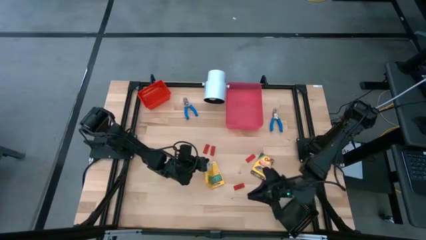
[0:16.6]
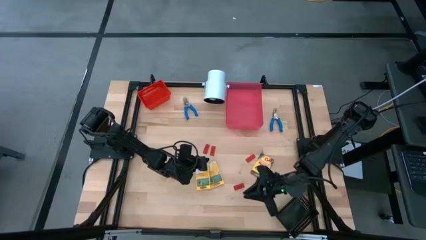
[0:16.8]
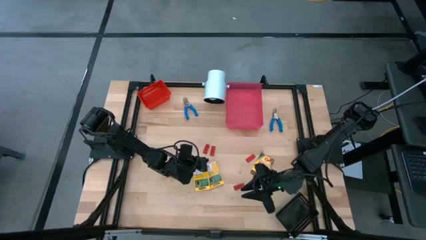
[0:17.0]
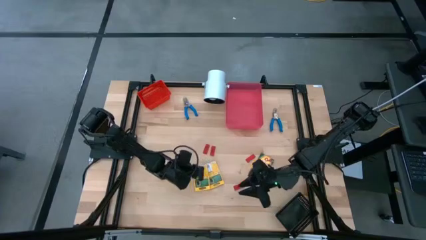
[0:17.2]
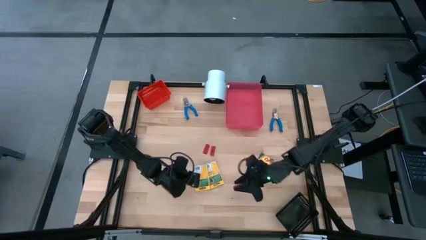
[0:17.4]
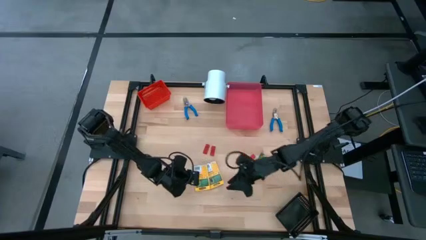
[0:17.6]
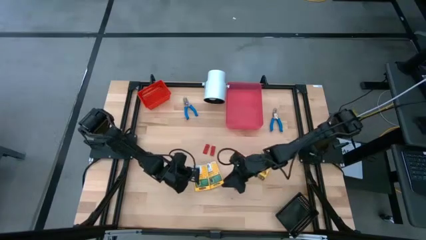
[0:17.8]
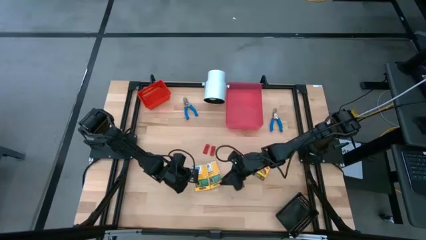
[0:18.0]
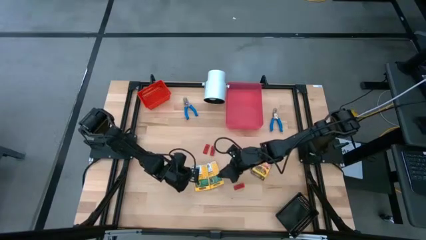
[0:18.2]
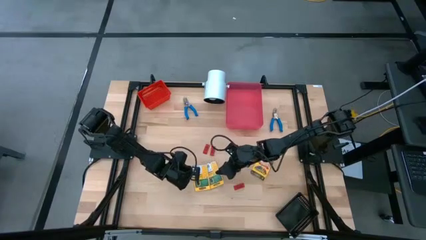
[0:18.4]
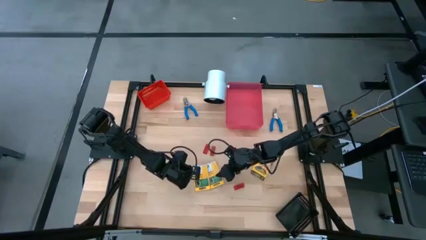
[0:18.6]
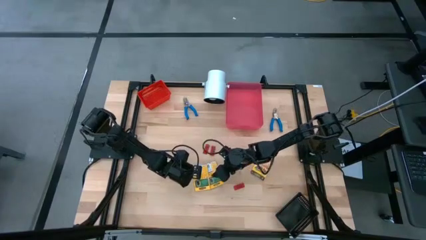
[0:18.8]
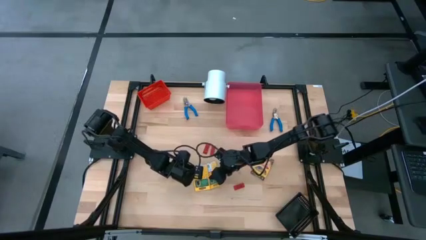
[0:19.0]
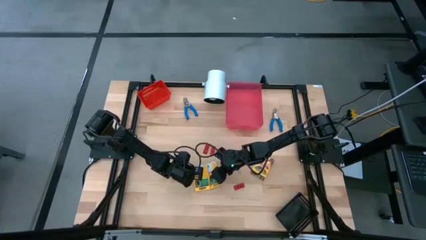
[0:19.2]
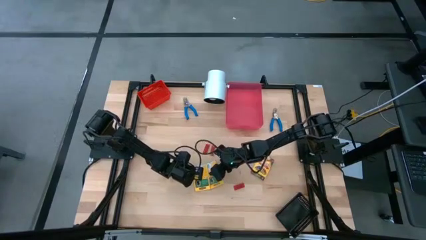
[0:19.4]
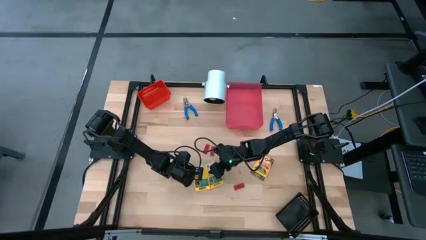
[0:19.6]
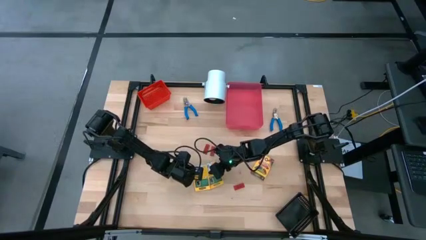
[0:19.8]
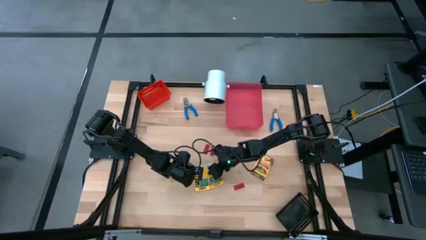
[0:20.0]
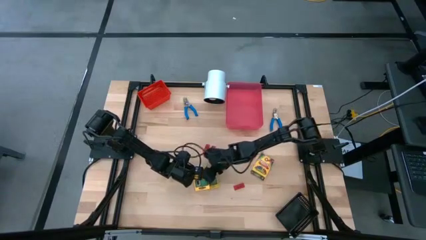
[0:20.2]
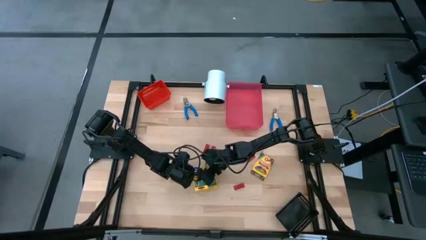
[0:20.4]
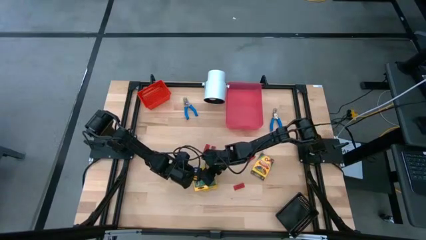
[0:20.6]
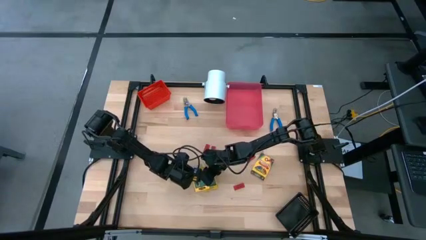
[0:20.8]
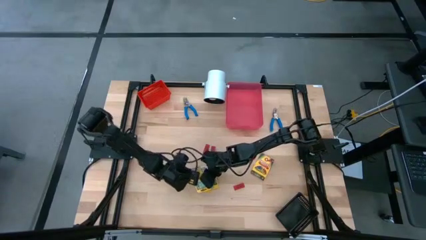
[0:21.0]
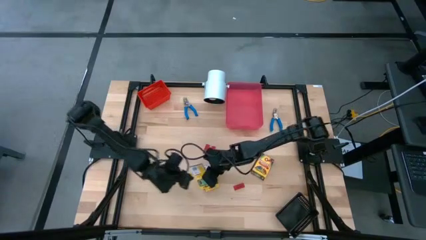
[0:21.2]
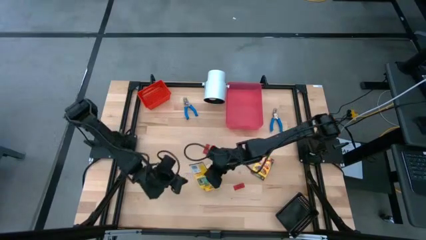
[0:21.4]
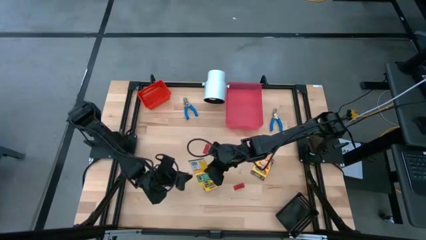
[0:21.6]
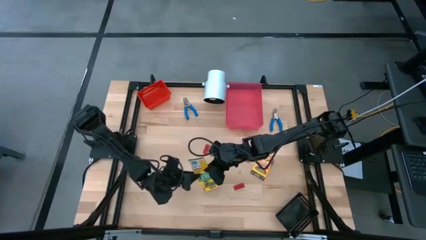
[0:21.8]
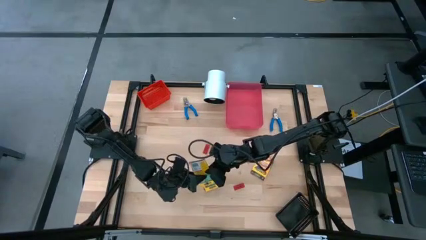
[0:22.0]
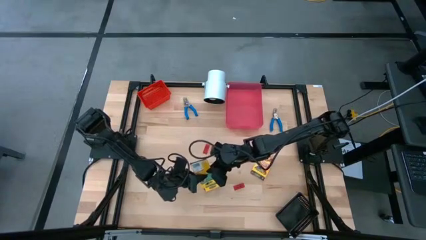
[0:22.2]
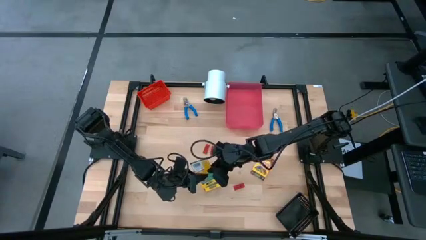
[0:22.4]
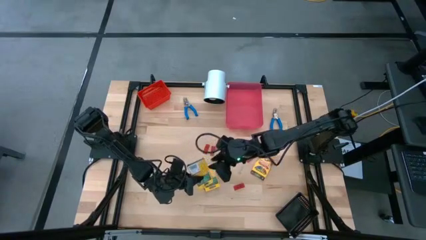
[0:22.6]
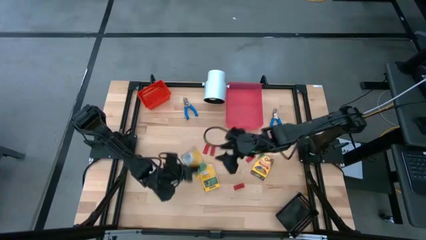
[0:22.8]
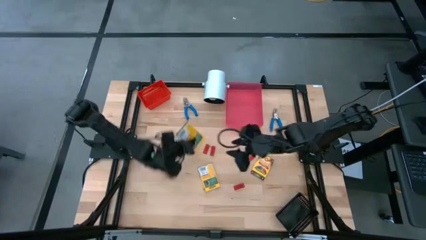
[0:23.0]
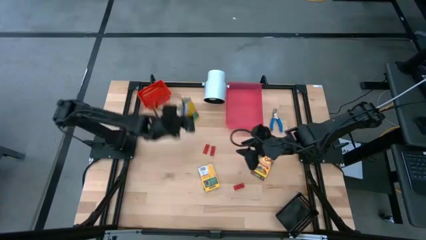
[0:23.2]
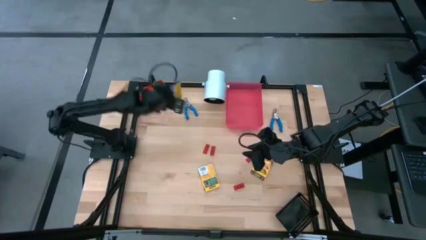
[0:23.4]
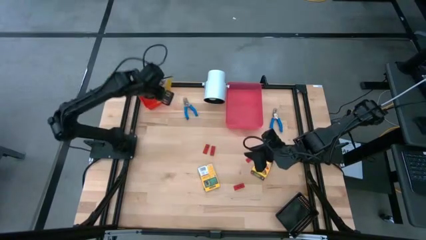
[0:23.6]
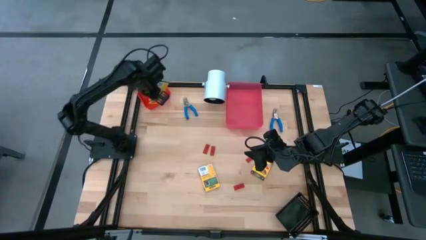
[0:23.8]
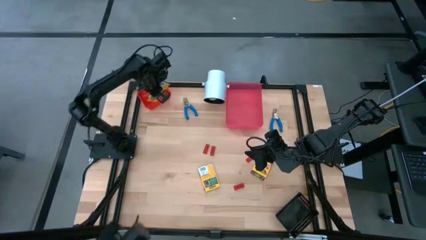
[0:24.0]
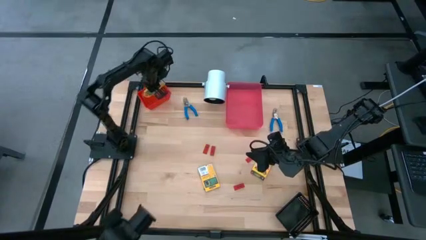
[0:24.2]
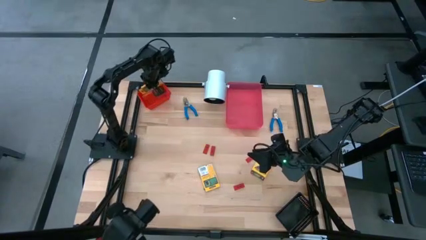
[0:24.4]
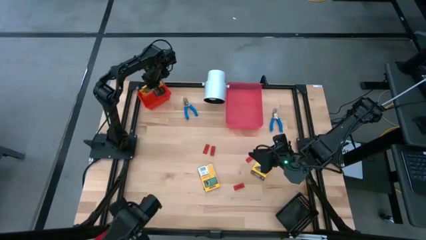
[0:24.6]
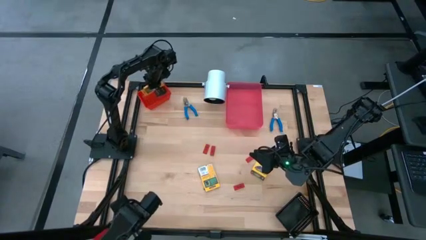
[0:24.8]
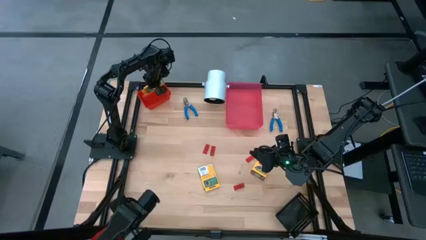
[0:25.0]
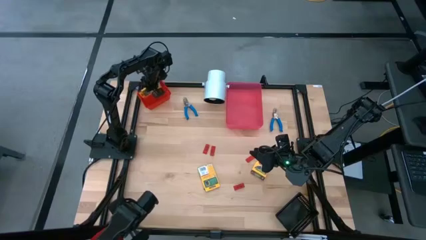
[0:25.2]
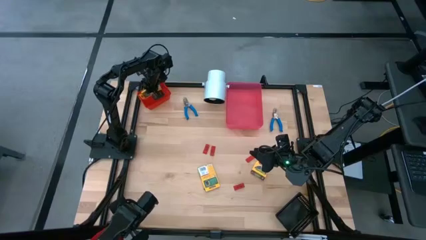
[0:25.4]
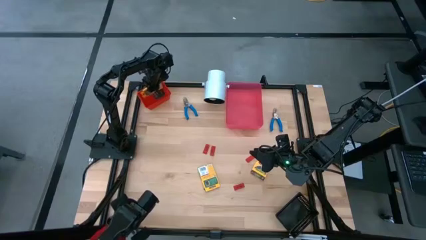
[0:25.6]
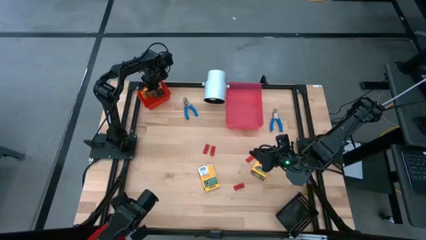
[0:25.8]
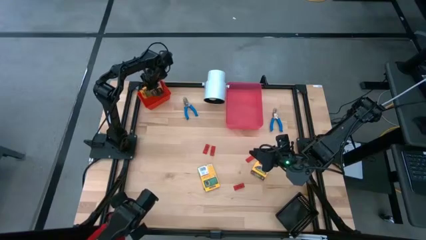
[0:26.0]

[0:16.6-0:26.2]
Task: Pick & Place School Supplies
Put the yellow crayon box into the red bin

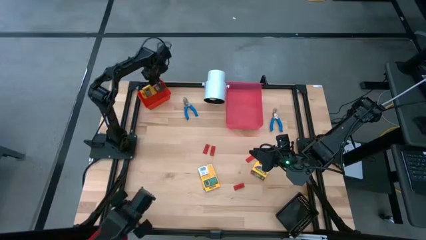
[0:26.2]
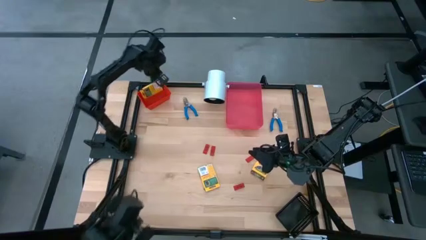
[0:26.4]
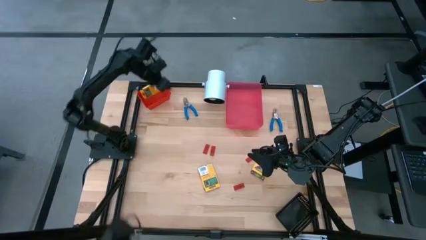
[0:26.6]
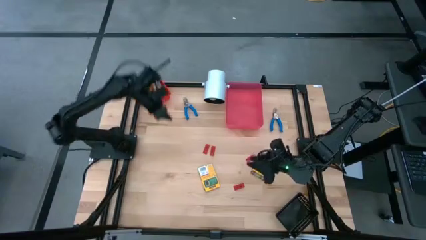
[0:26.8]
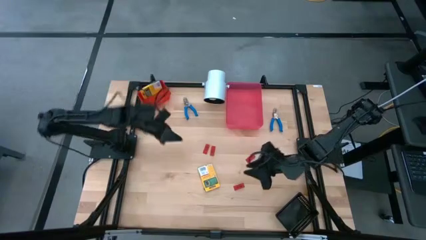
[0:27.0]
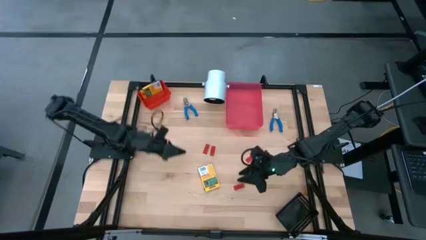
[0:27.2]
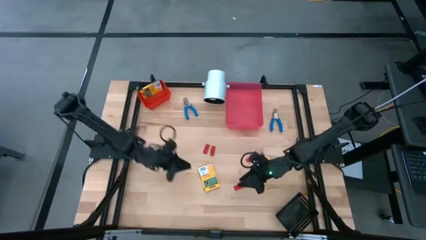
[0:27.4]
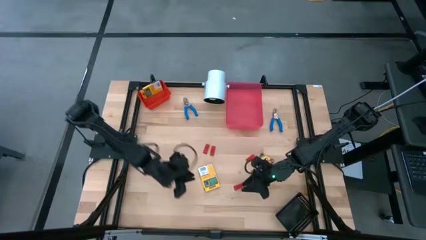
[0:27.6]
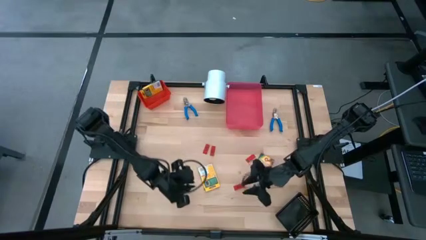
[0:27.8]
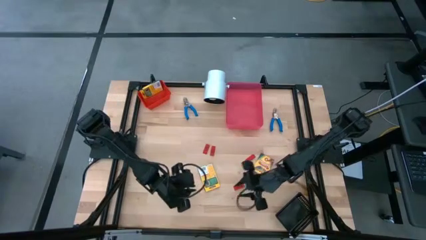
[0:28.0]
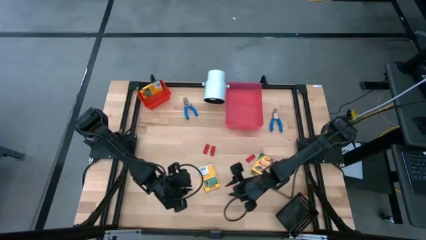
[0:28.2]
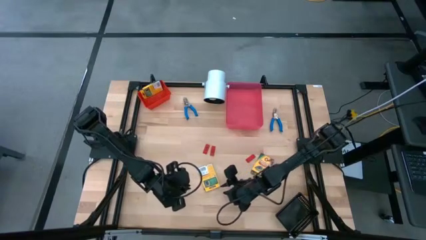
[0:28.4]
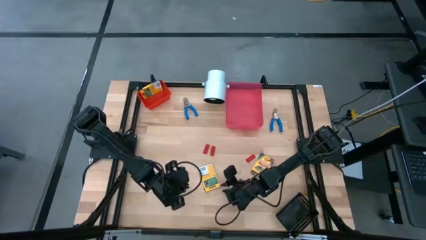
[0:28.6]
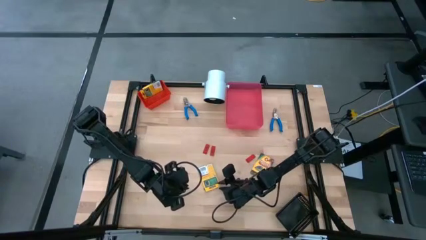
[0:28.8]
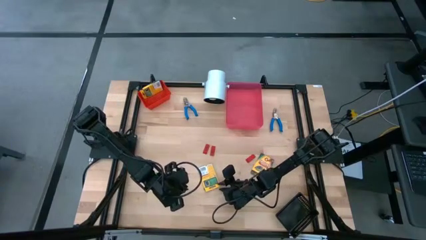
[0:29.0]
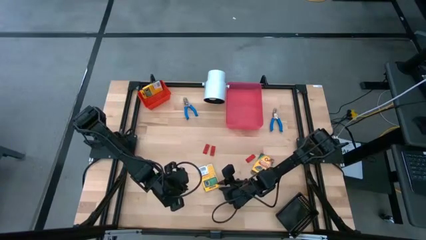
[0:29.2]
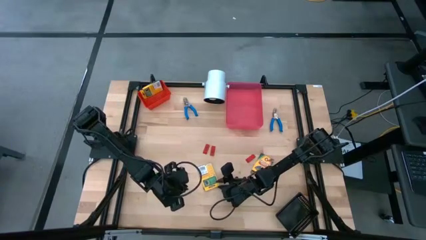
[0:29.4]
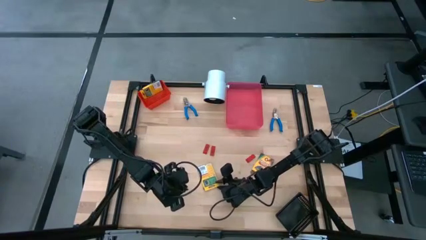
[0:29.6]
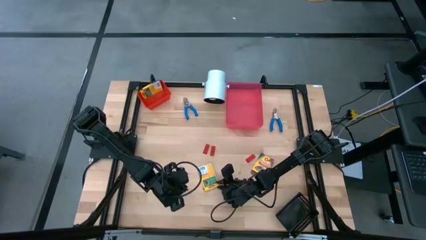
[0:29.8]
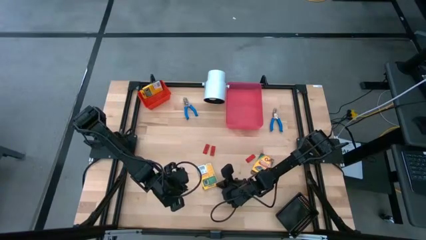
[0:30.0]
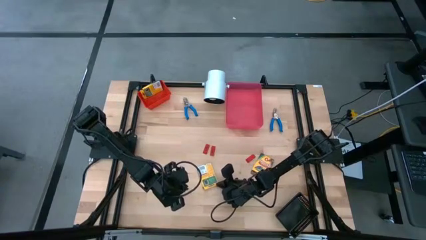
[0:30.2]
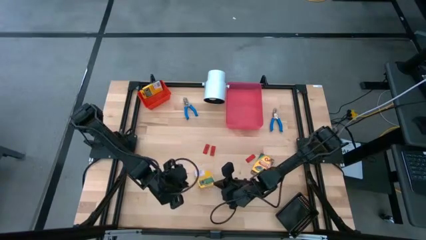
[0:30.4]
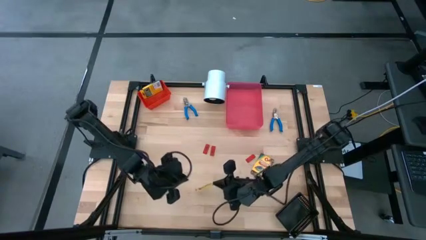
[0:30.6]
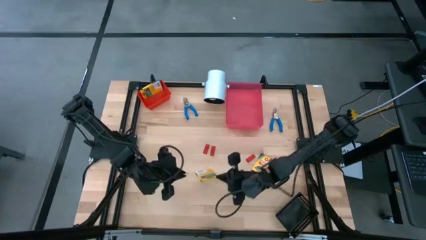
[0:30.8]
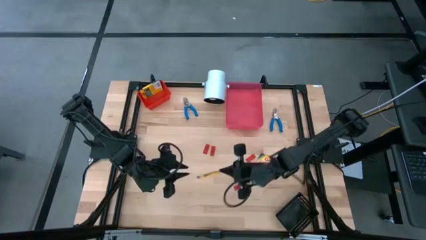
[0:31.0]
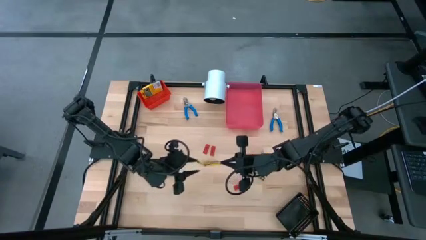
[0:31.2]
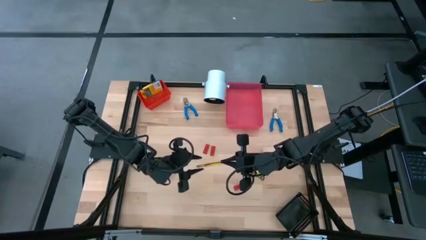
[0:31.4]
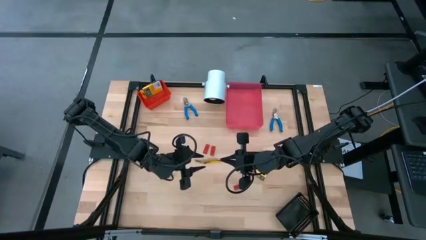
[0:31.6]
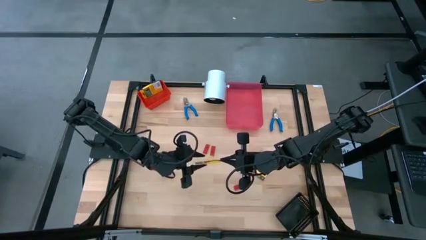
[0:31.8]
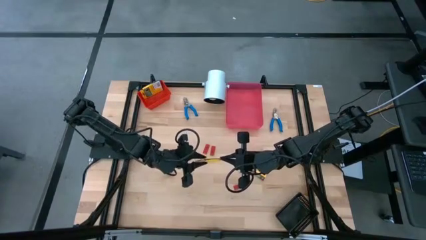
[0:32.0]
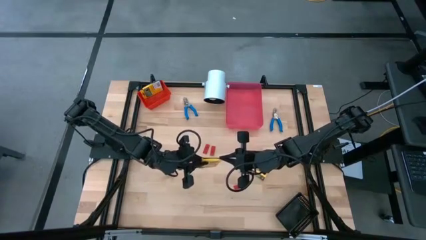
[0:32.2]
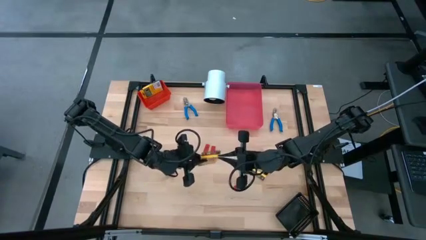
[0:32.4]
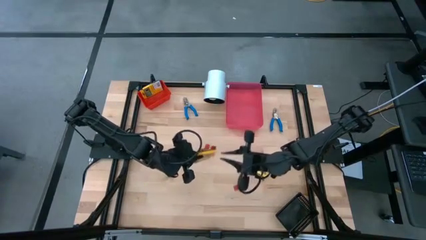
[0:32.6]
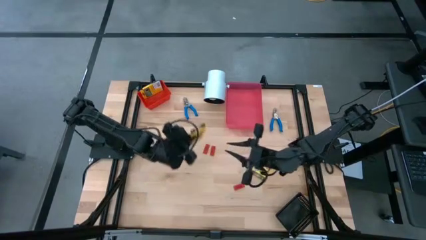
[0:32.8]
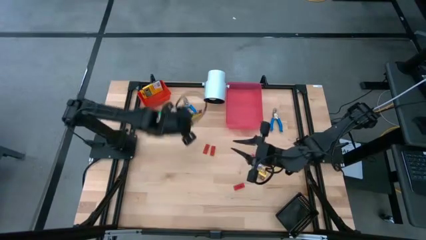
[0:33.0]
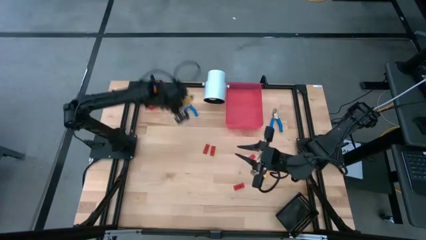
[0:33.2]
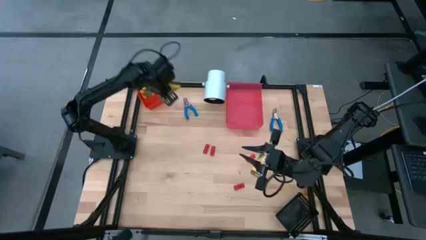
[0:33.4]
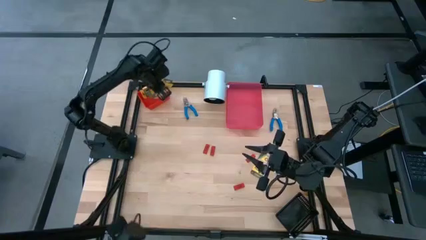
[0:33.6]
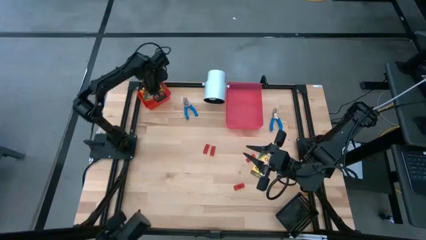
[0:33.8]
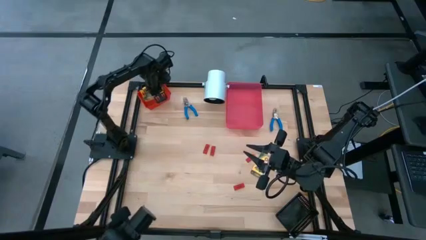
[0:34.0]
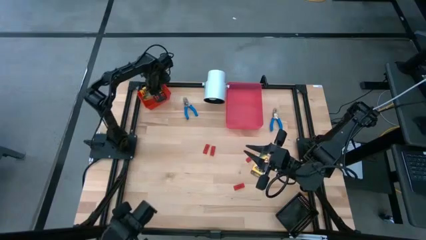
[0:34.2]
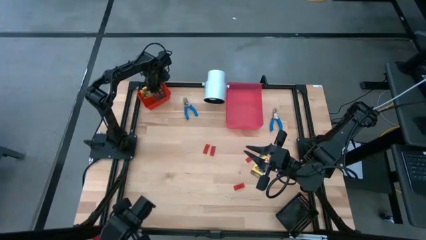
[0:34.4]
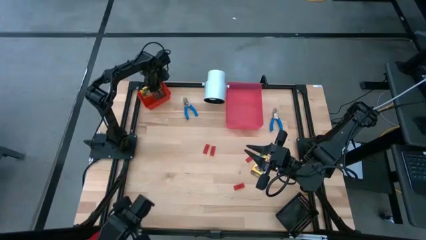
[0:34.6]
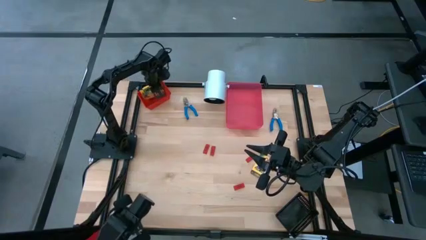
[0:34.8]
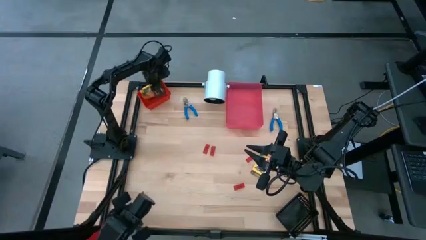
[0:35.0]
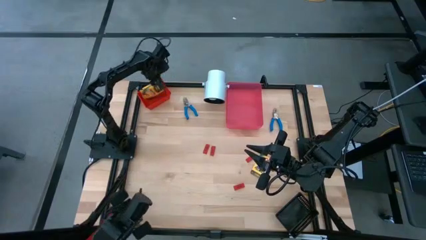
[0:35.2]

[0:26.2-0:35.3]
Put the yellow crayon box into the red bin
